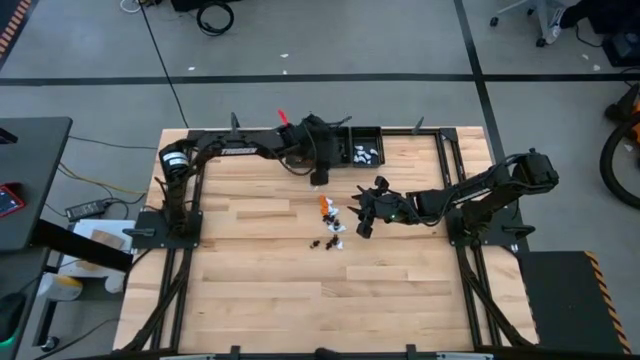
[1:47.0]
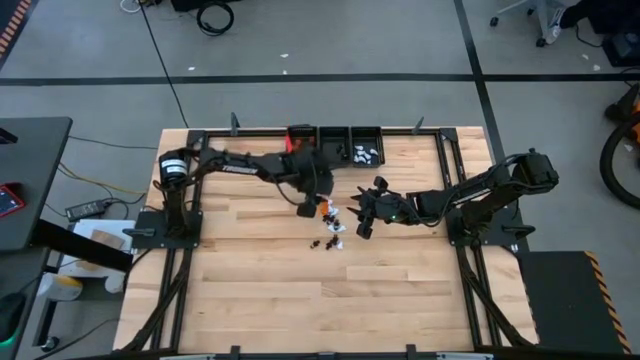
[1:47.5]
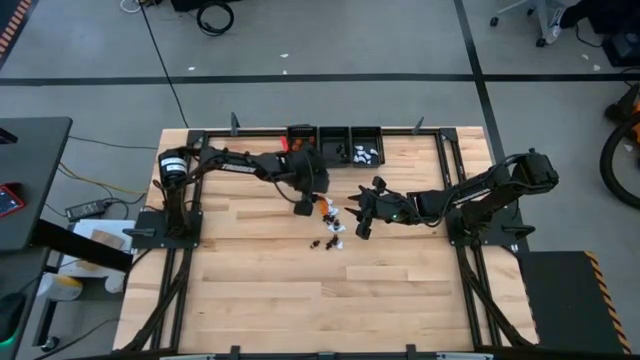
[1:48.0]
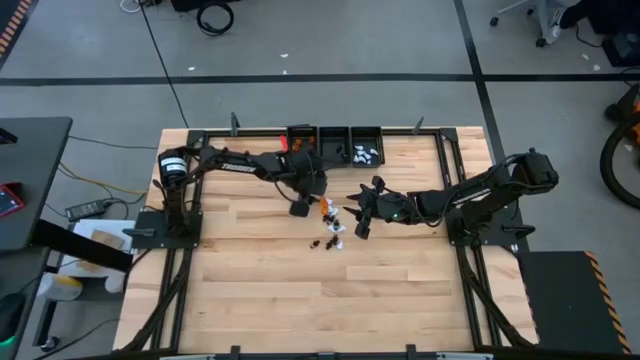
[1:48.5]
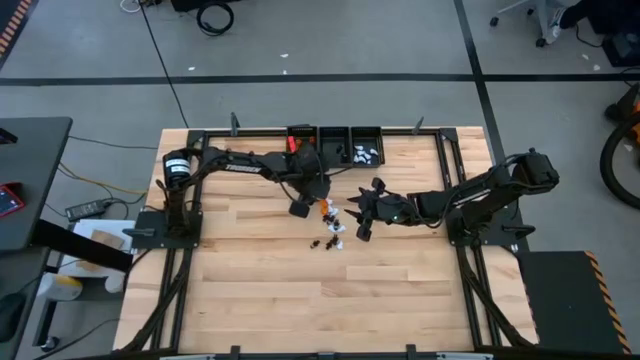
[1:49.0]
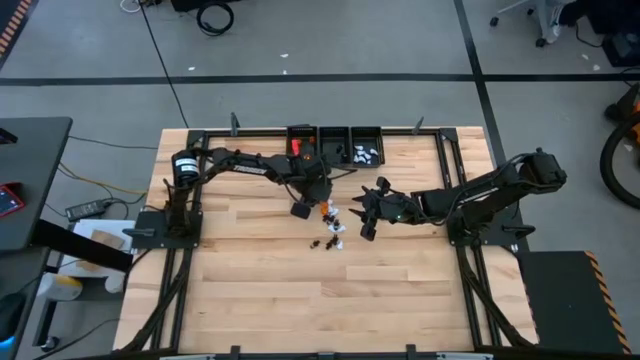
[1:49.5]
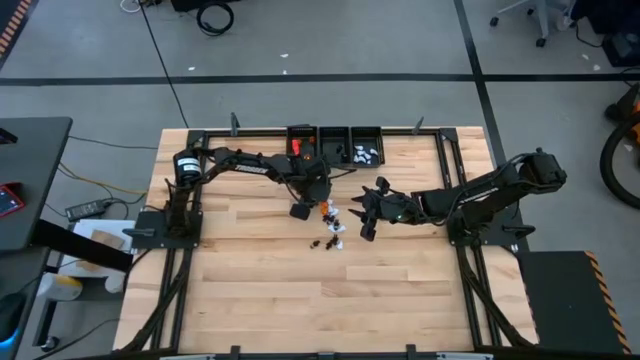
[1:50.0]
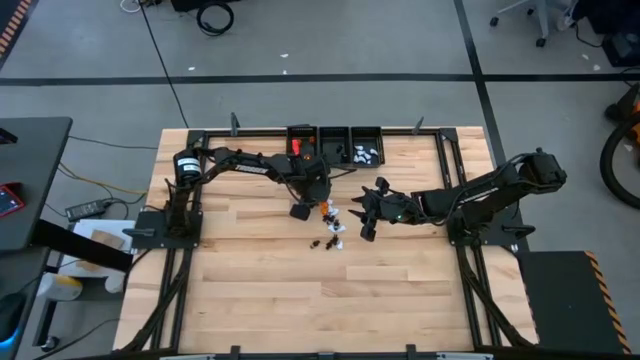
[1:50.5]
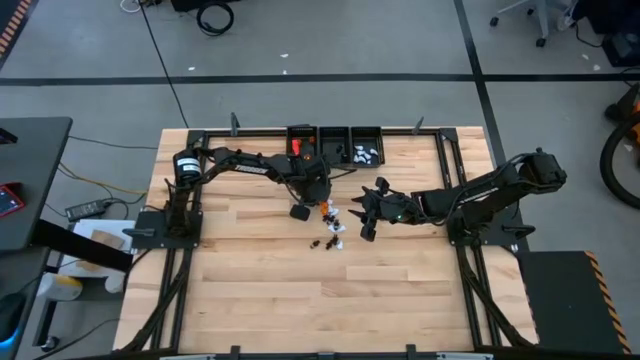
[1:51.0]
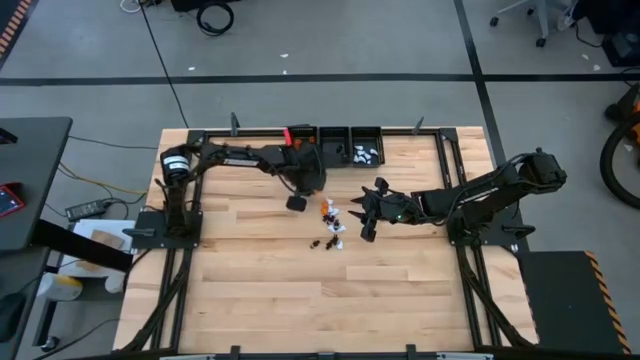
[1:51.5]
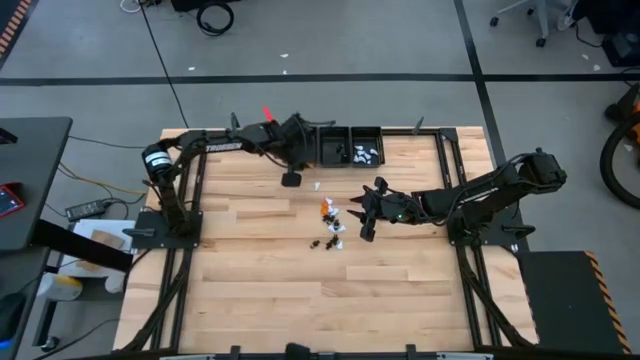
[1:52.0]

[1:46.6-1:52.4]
Task: Sort game pieces by color
Put the orange game piece into the left black basket

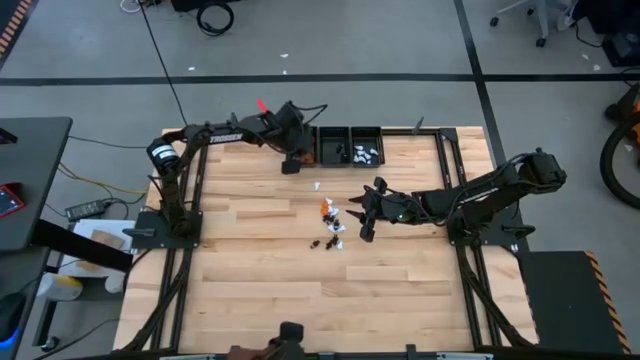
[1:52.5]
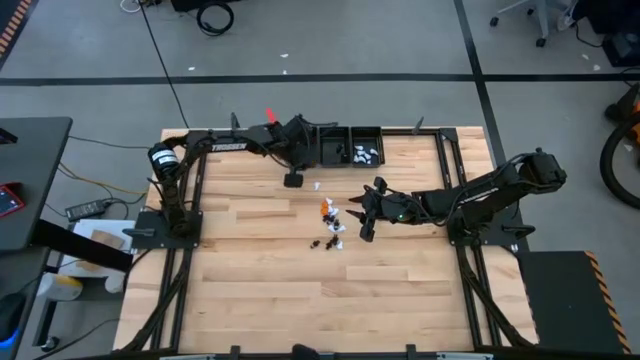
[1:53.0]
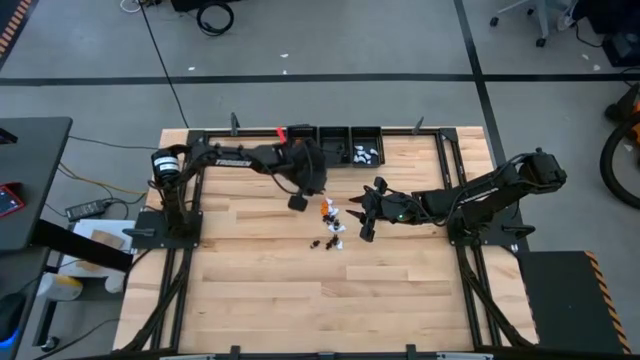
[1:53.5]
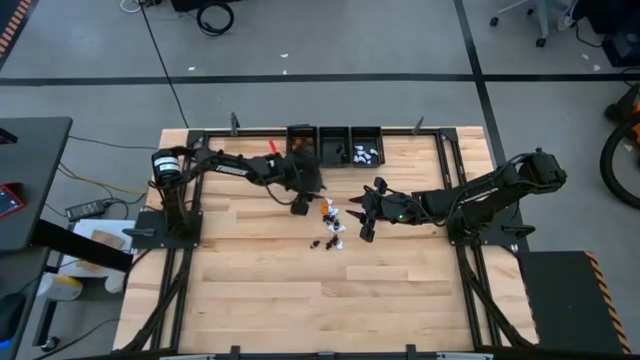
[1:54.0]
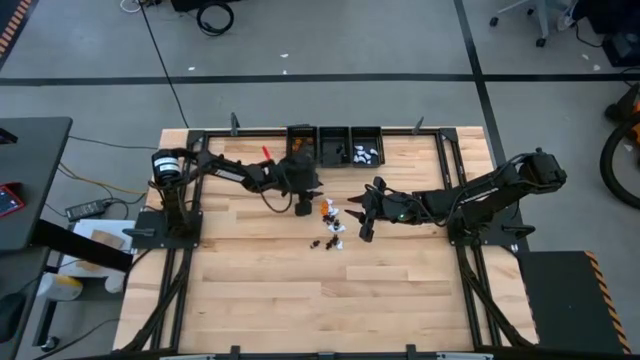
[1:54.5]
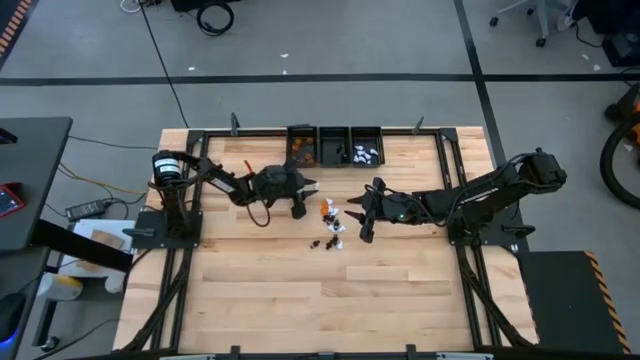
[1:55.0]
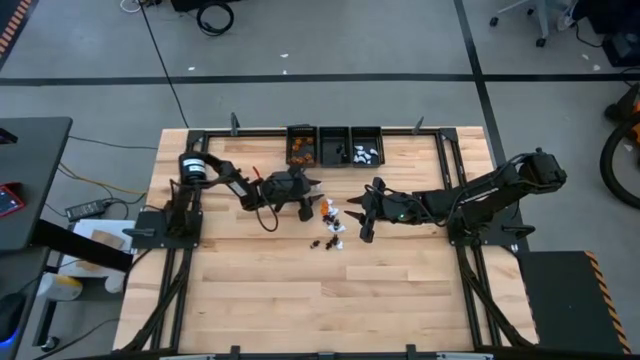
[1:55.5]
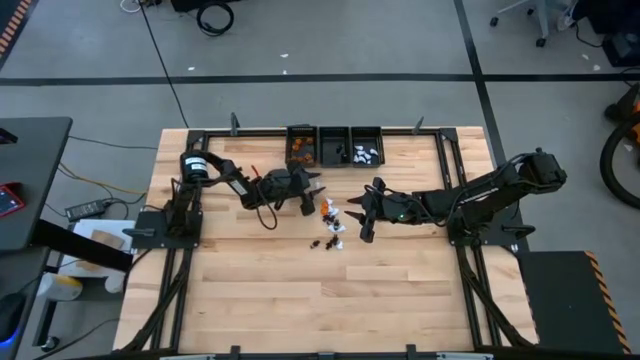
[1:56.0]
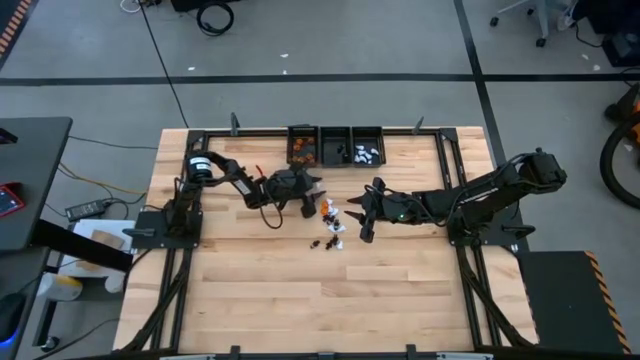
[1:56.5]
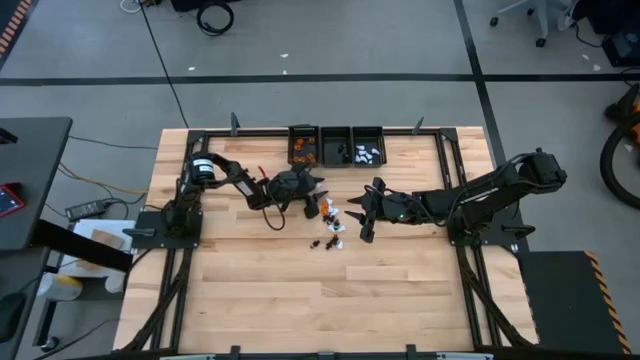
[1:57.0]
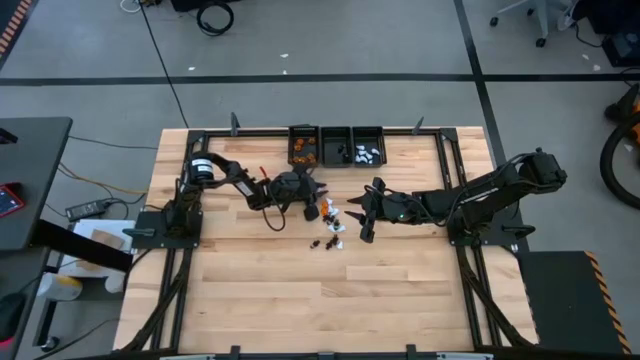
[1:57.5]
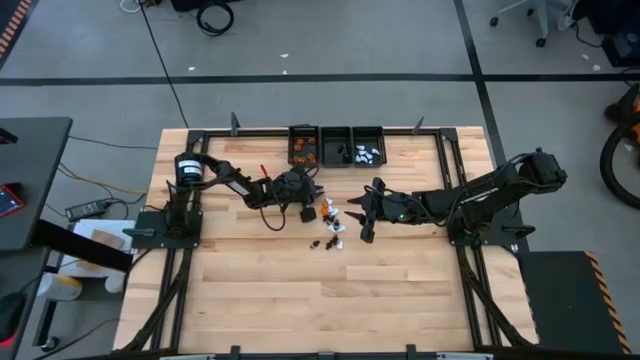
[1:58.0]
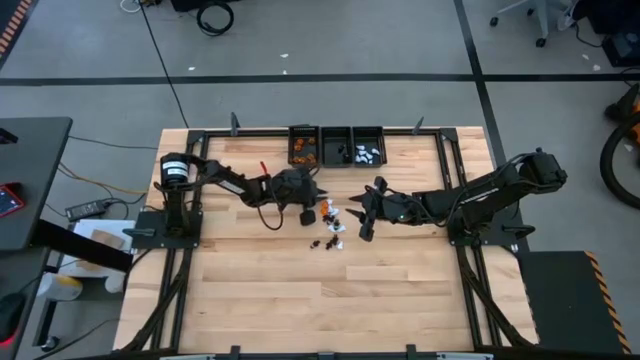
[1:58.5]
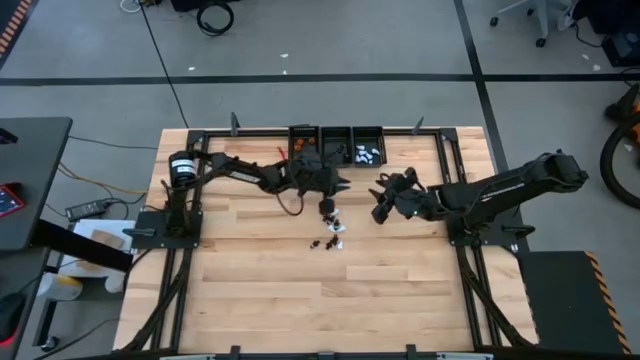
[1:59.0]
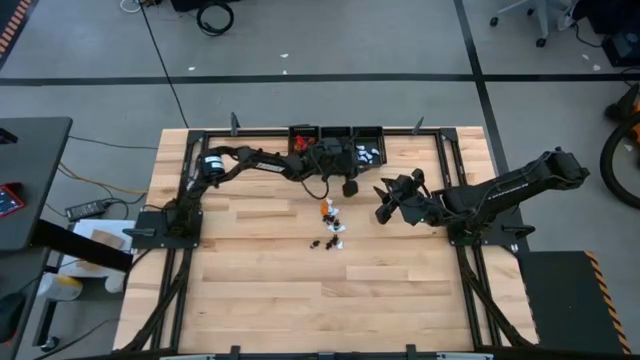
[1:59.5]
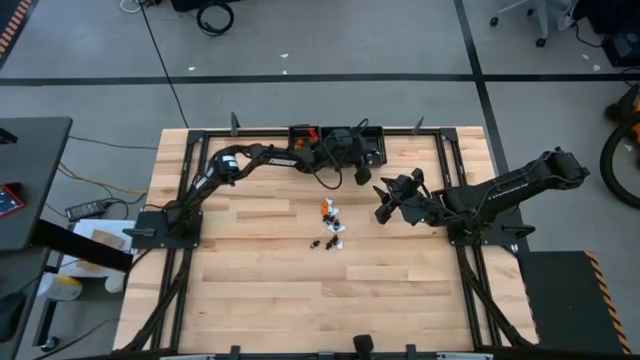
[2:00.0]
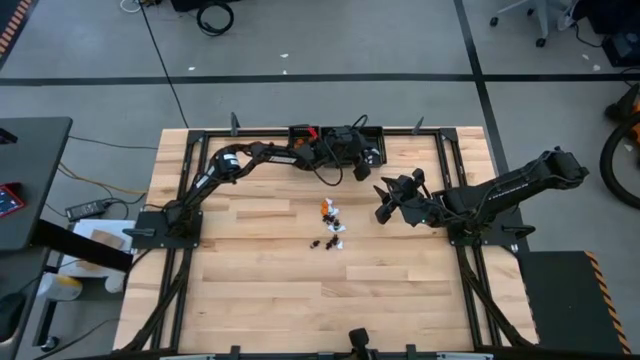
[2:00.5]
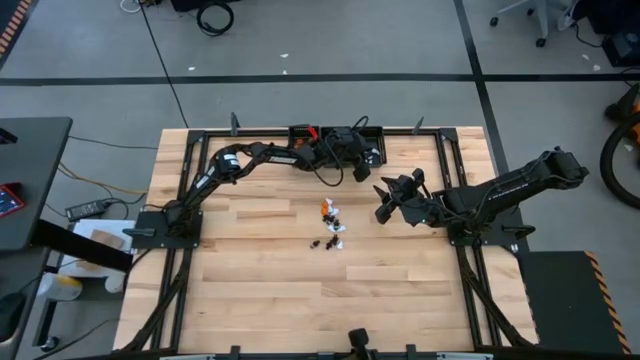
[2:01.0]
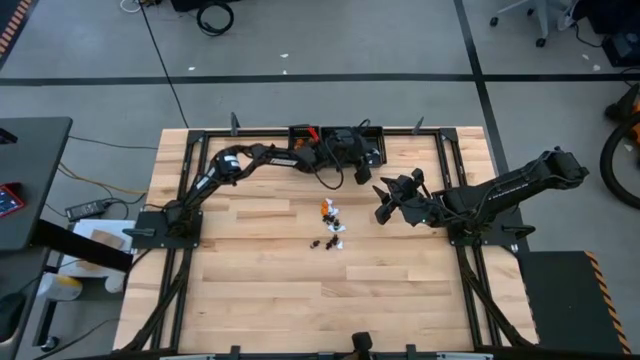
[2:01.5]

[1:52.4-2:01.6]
Put the white game piece into the right black basket

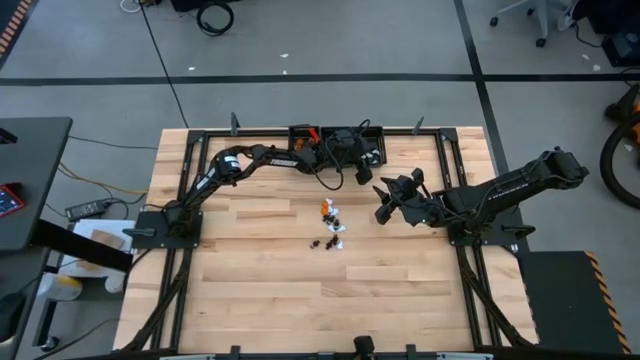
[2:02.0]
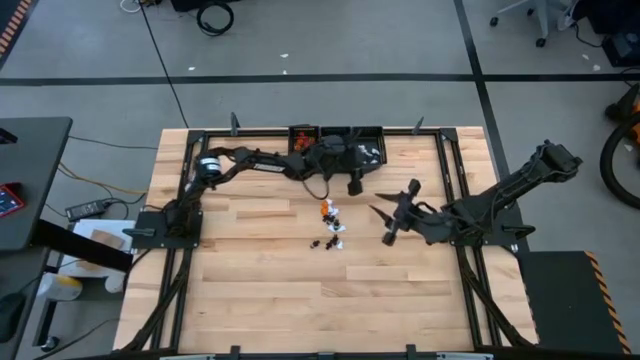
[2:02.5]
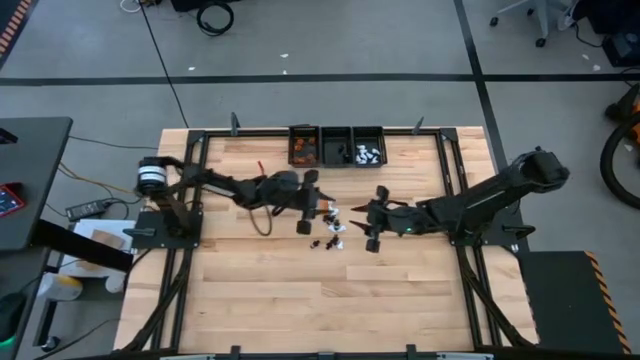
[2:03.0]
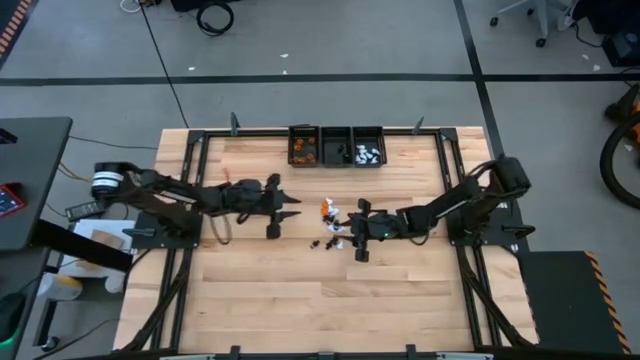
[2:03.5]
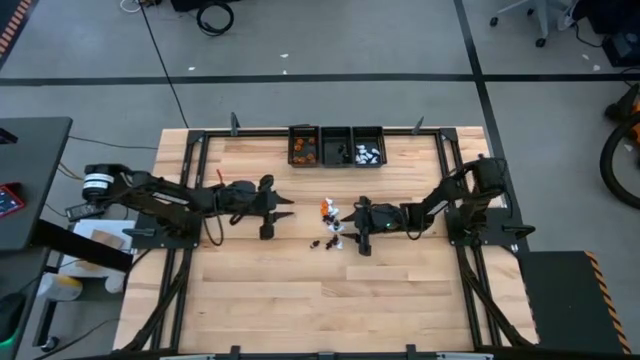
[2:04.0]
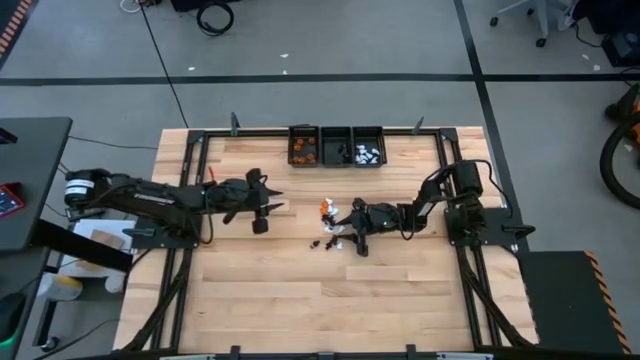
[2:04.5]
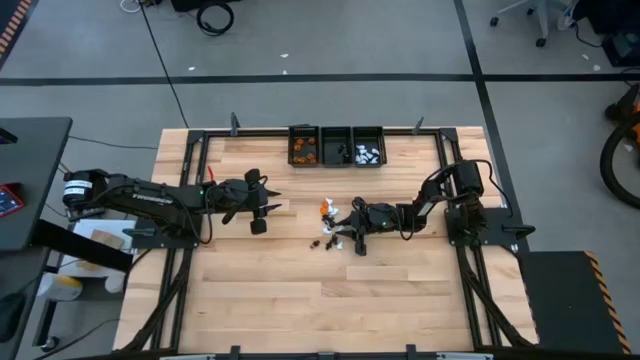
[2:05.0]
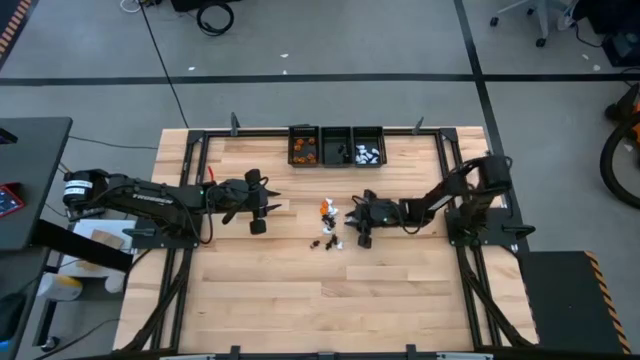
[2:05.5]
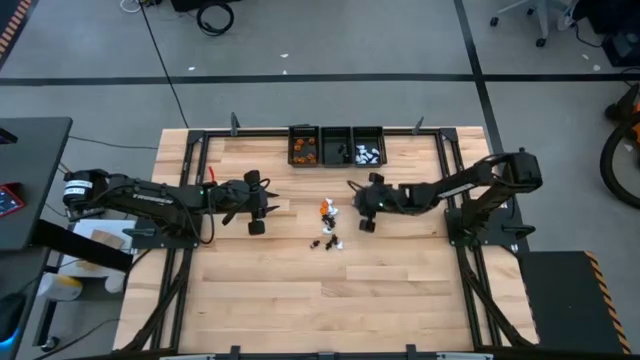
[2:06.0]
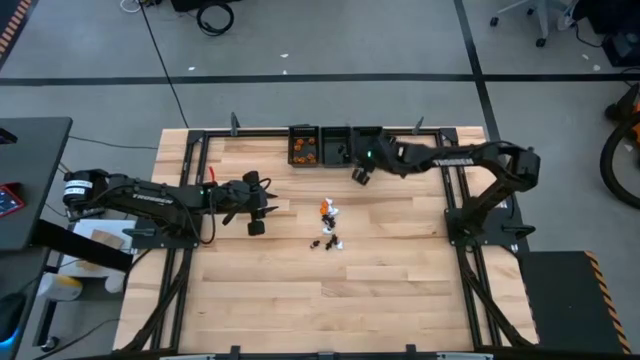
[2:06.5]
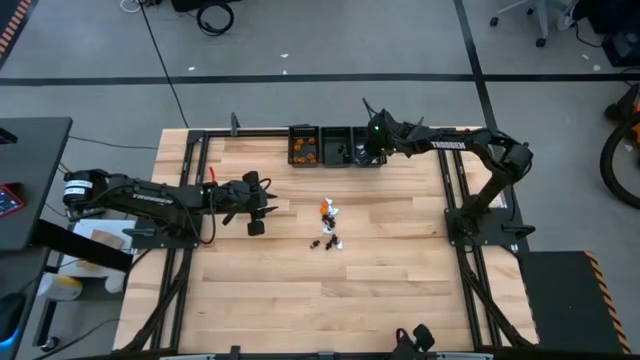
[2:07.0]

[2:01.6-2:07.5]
Put the white game piece into the right black basket

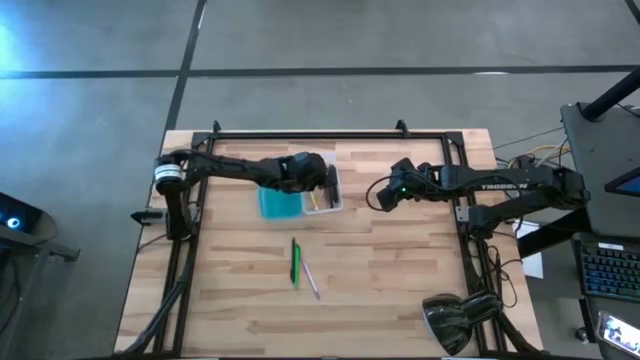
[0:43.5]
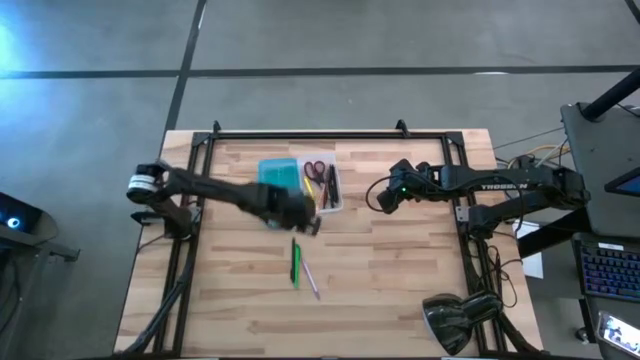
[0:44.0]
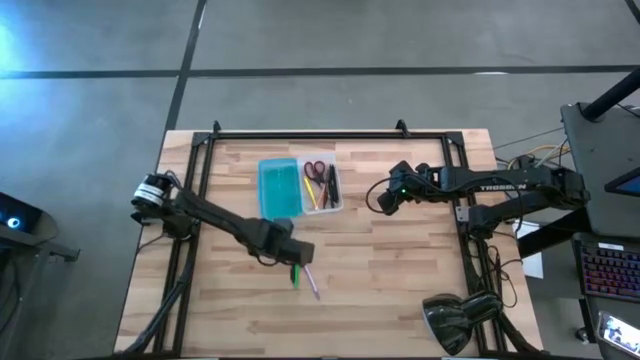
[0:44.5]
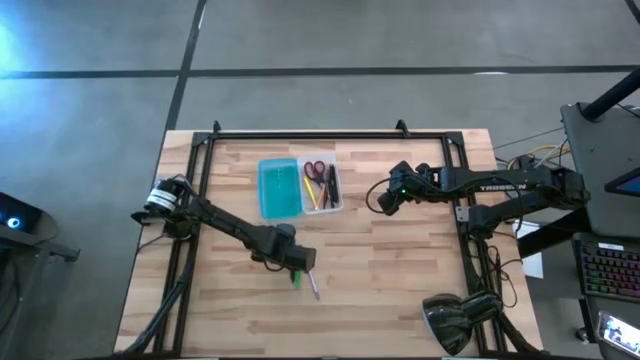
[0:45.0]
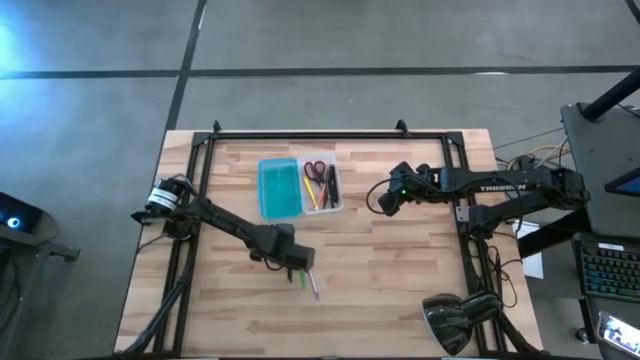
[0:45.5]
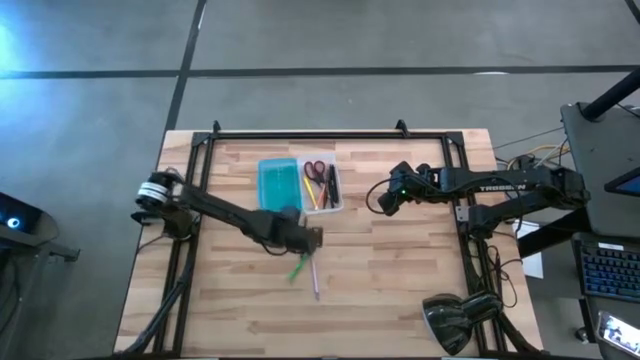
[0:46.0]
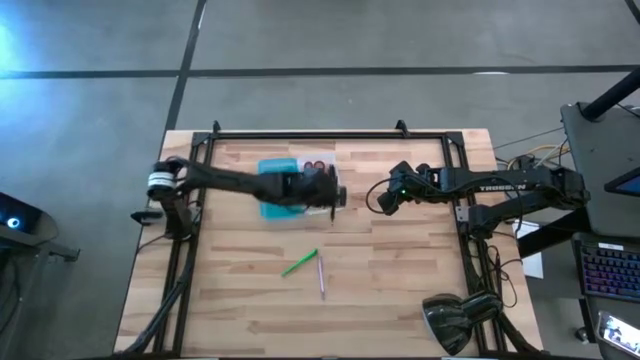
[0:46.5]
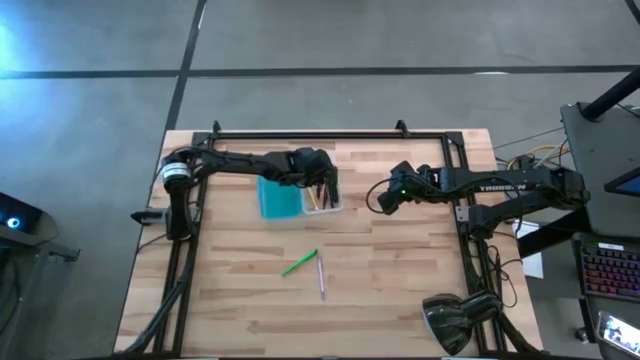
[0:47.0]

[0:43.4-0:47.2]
Task: Pick & place school supplies into a supply box
Put the black pen into the pencil box
